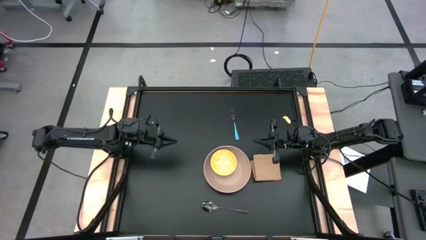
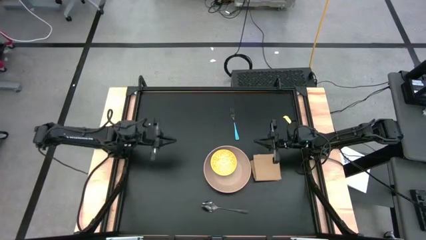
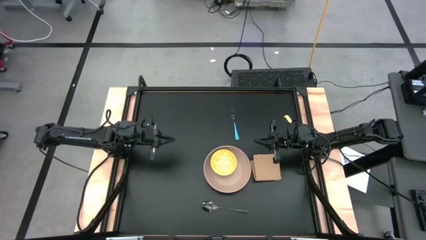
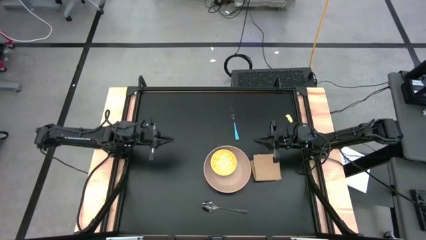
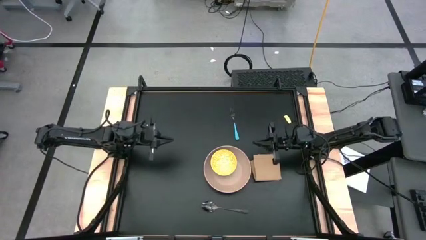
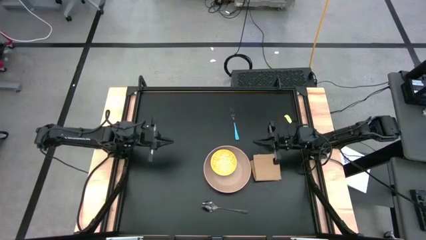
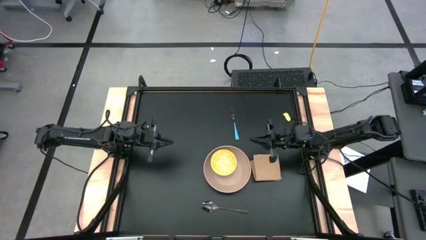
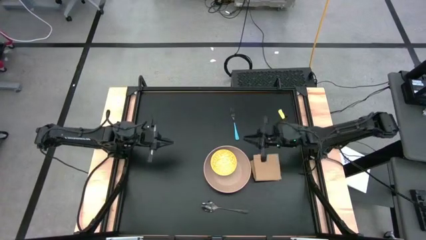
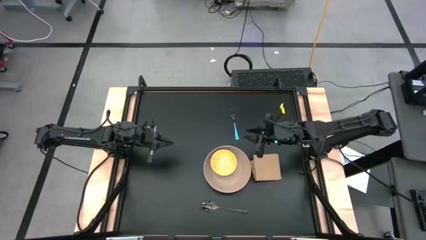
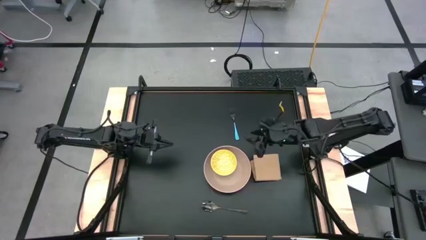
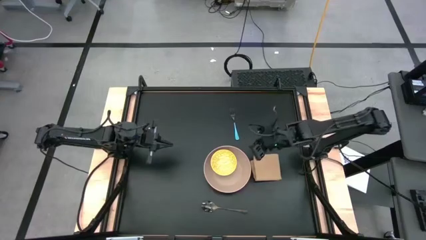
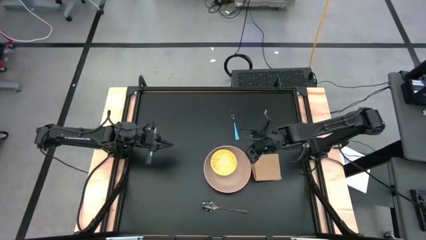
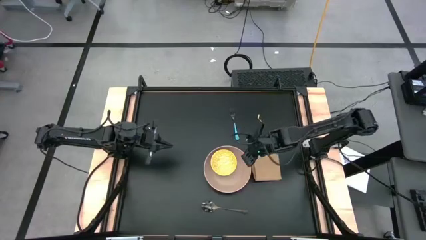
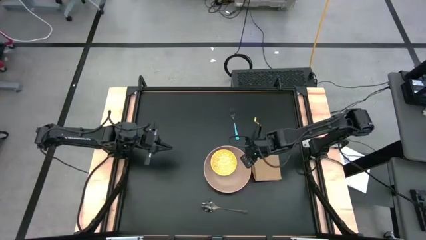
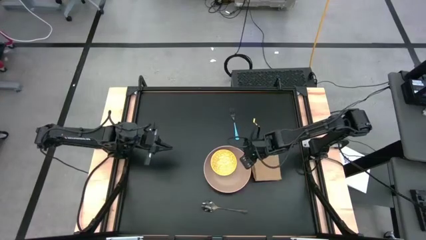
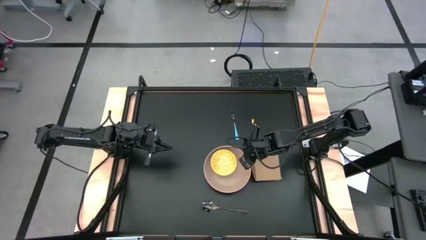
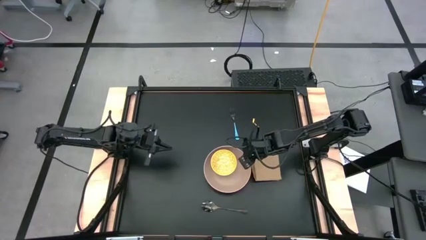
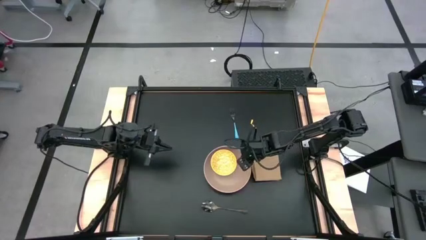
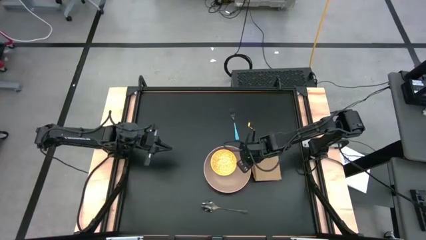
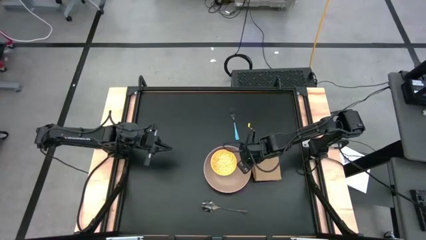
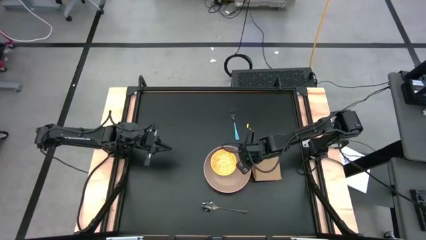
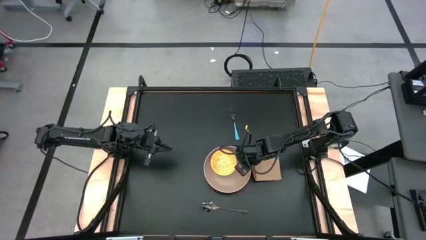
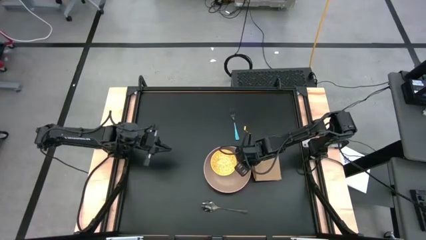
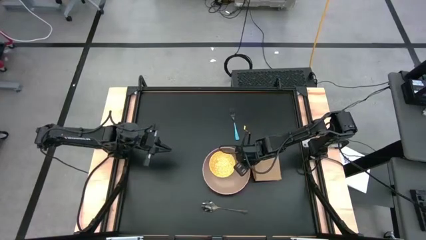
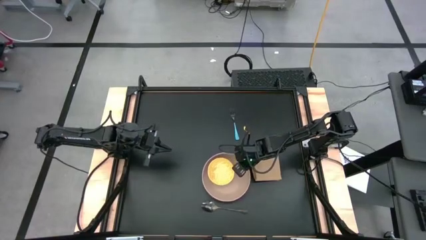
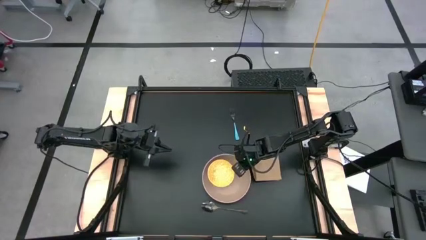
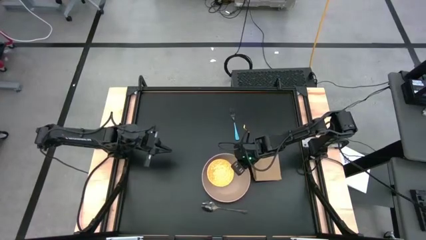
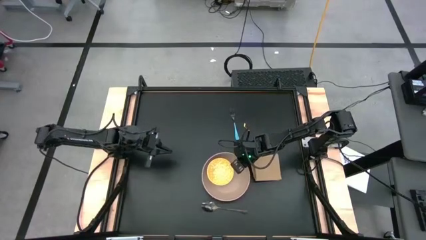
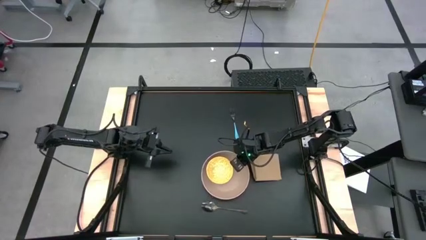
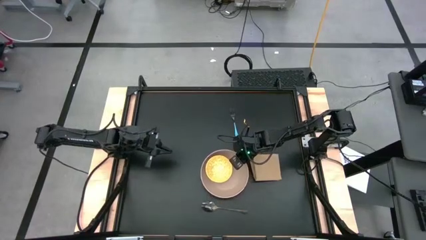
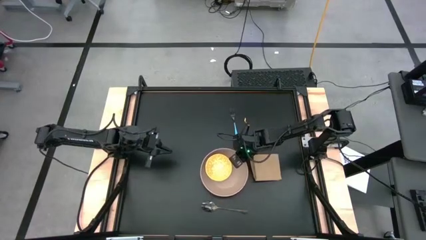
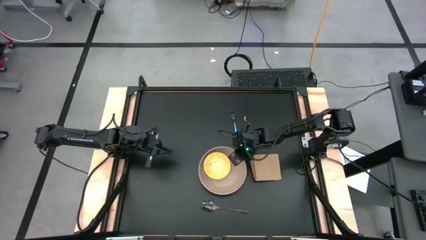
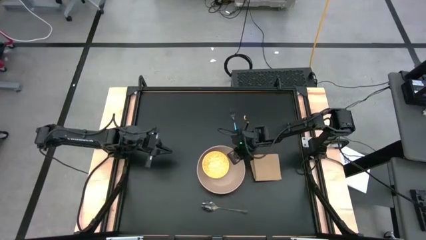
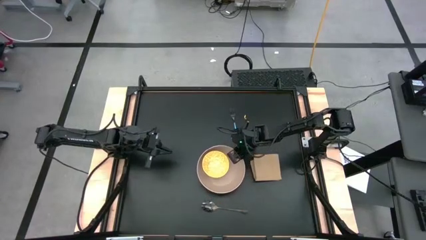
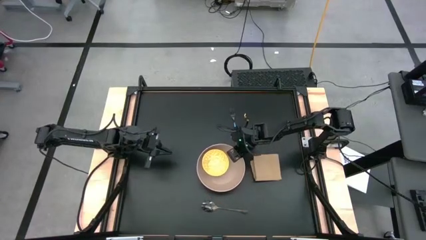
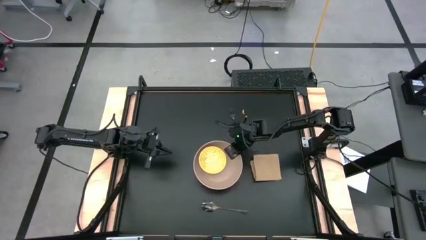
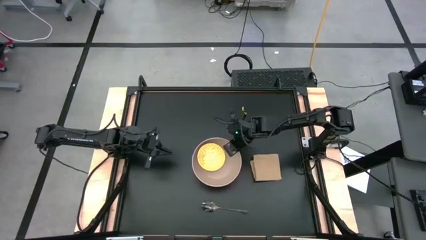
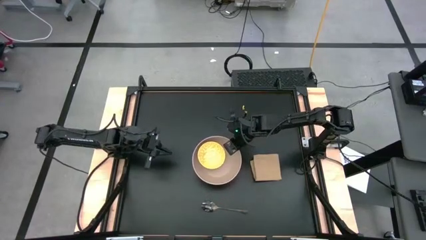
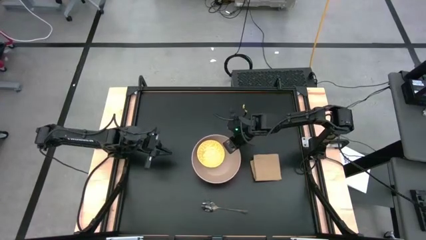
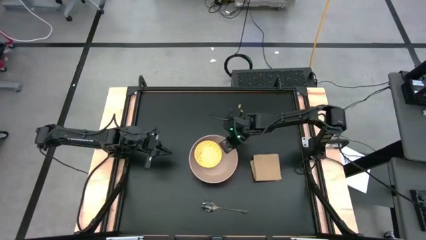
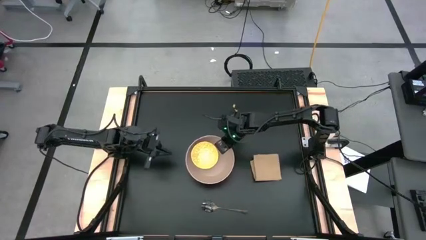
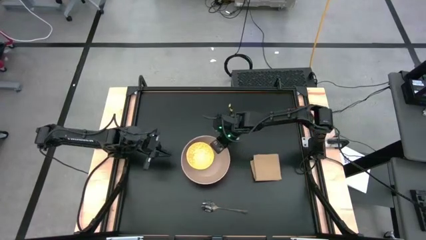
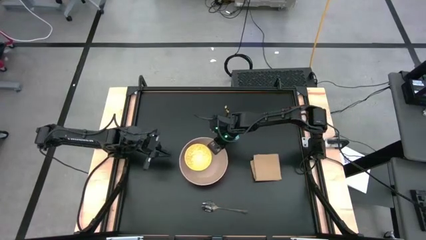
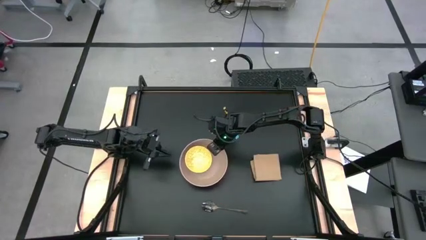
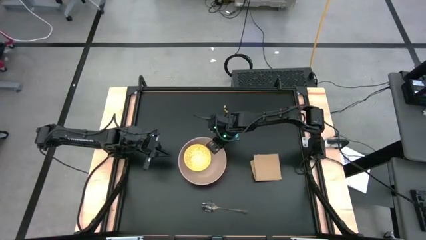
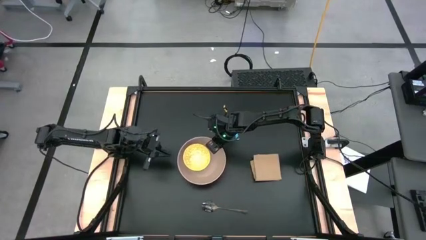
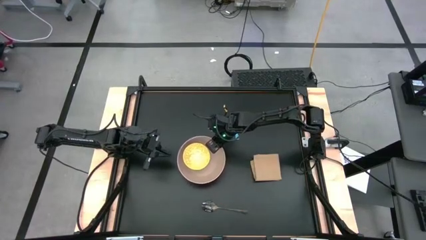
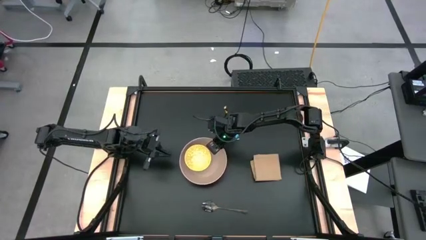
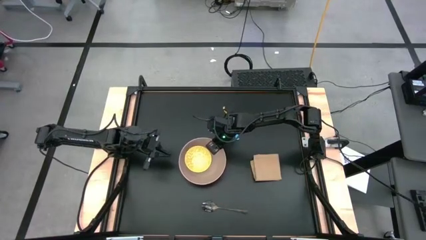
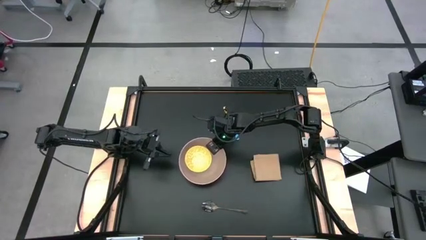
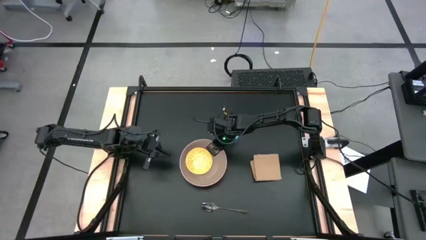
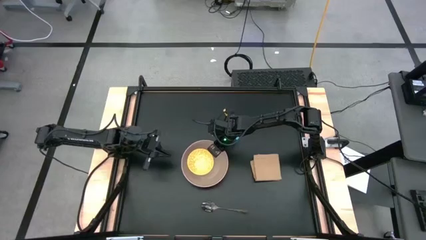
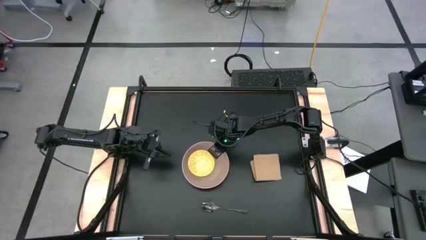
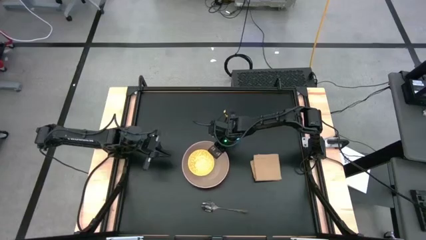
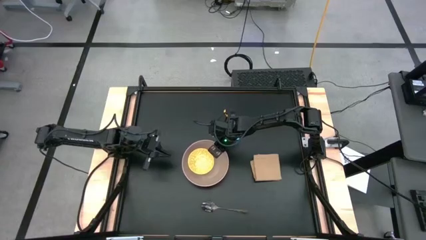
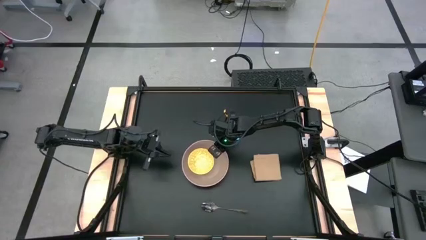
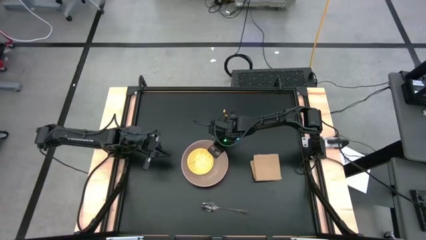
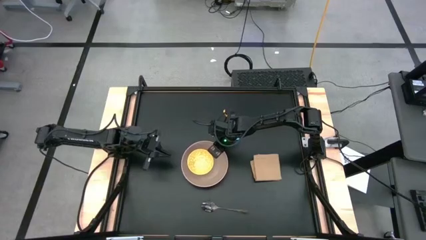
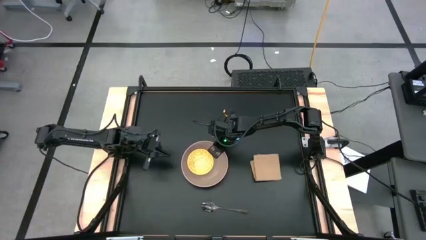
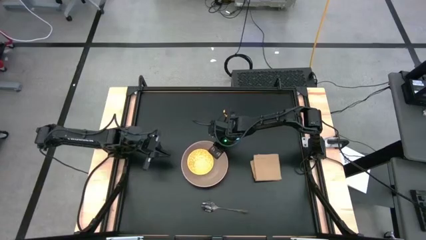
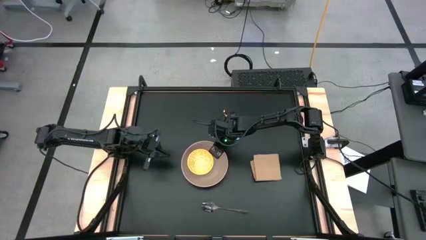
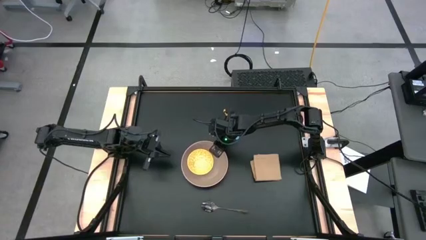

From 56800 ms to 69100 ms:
Task: Set table place
Adjust the brown plate

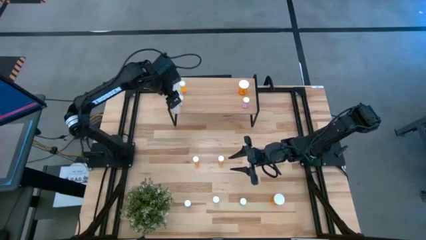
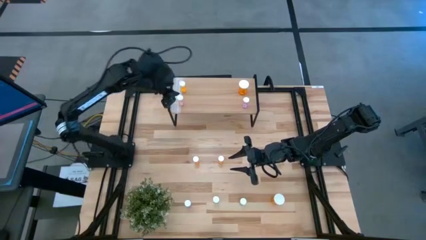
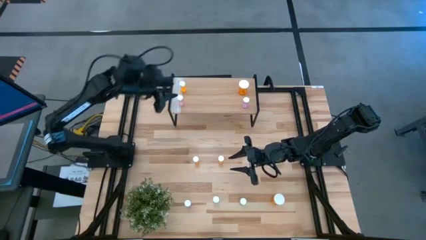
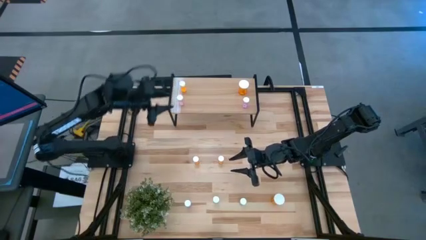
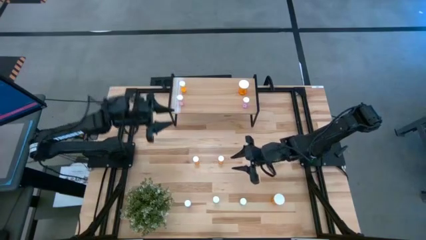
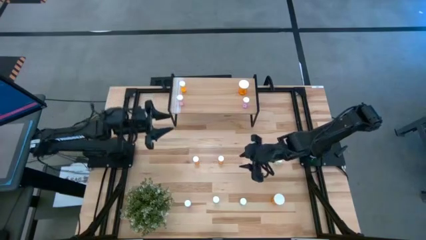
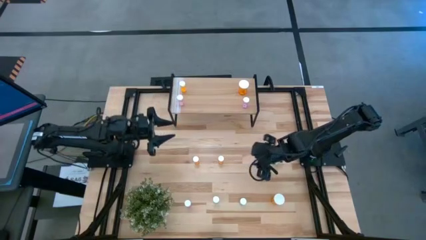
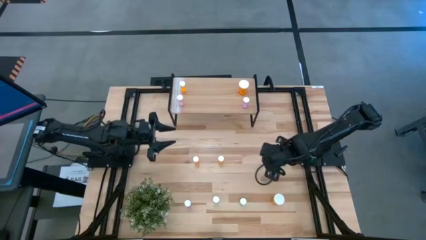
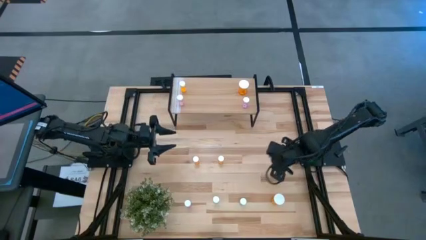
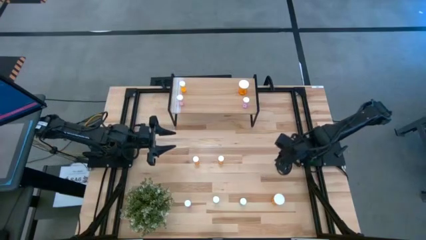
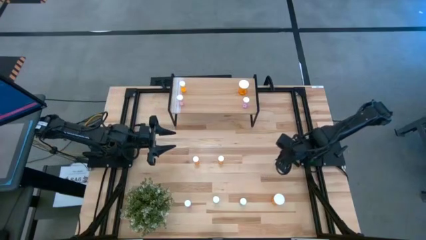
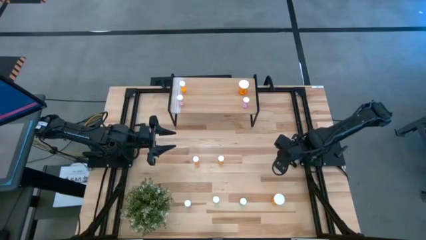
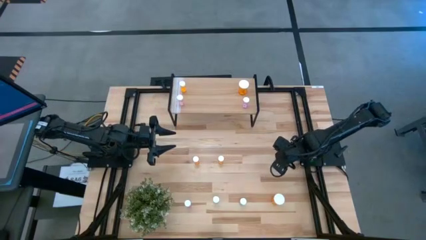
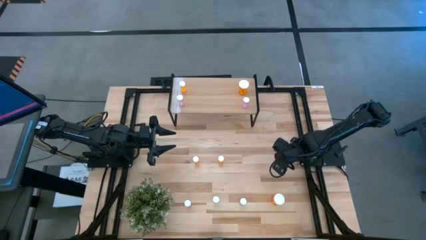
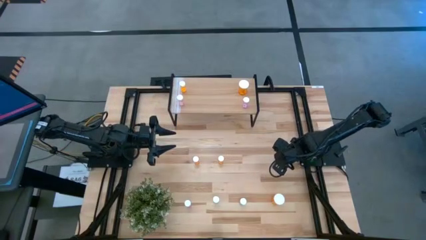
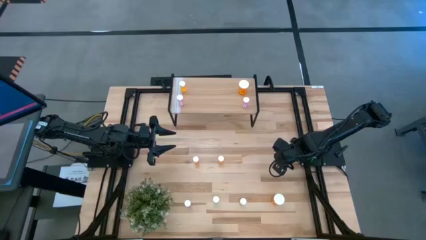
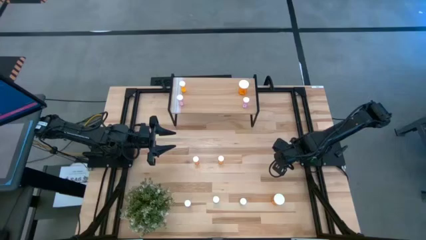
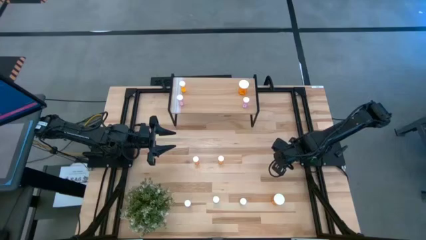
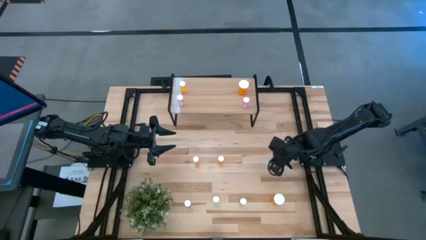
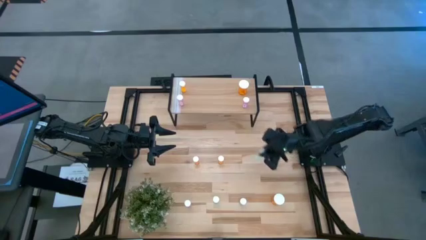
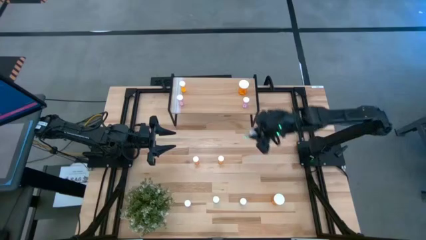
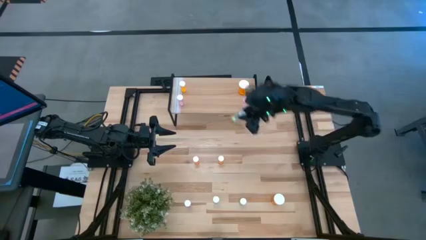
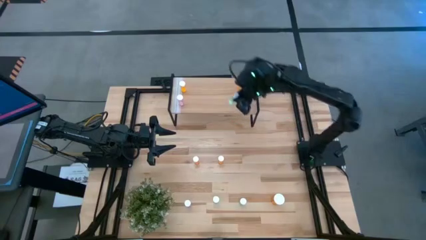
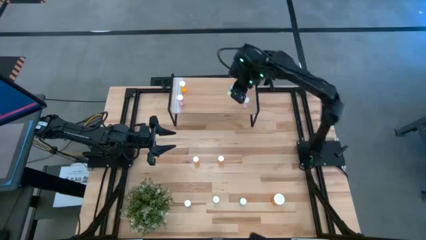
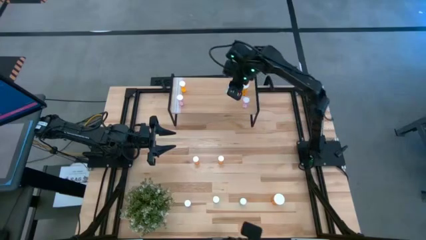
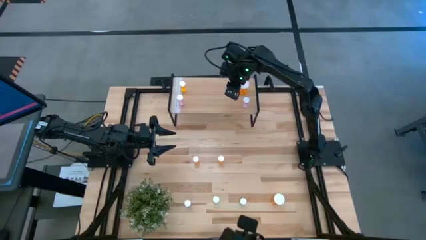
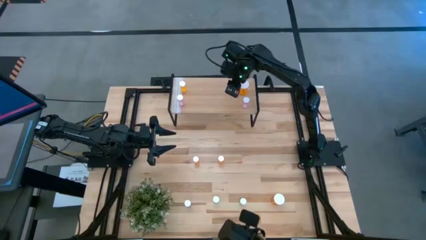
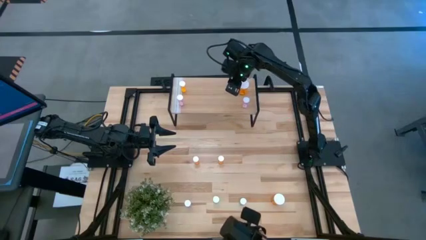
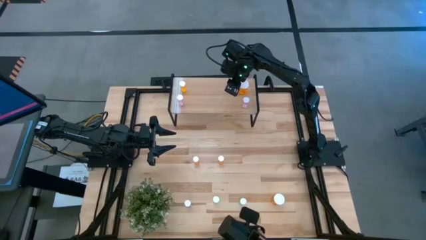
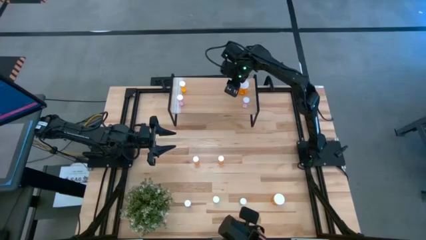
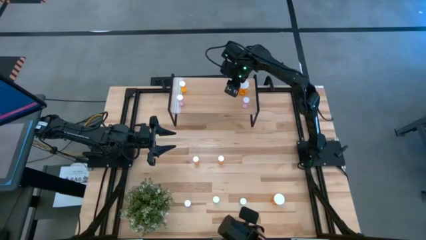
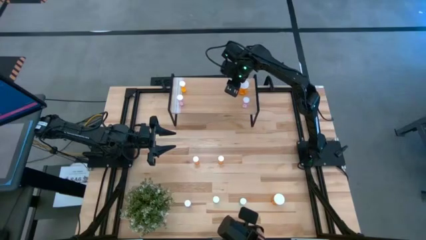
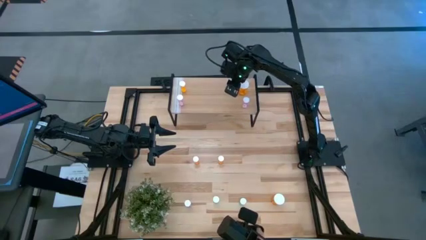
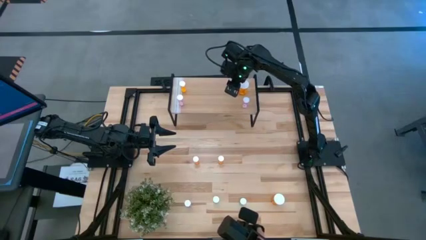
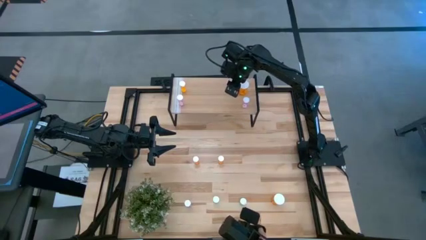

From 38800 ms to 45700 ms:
Task: Pick and place medicine bottles onto shelf by color
Put the top small green pill bottle on the shelf
